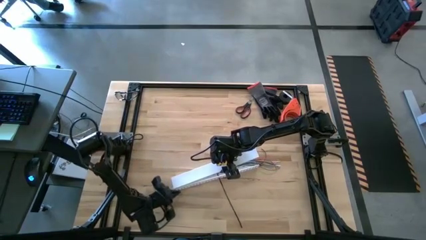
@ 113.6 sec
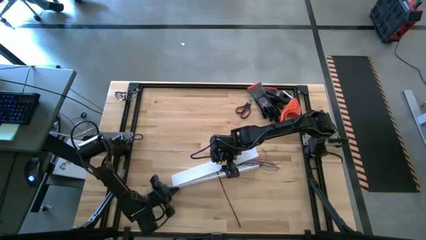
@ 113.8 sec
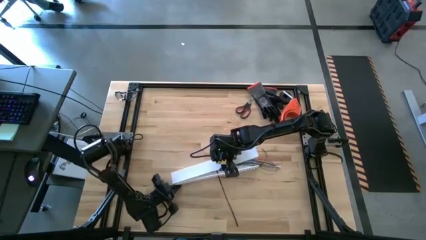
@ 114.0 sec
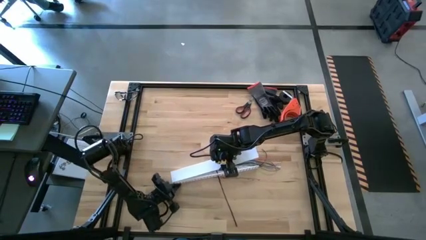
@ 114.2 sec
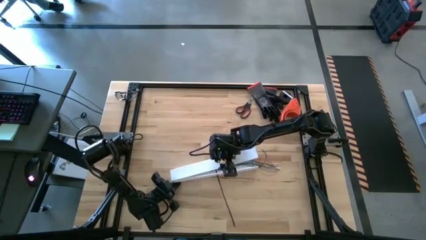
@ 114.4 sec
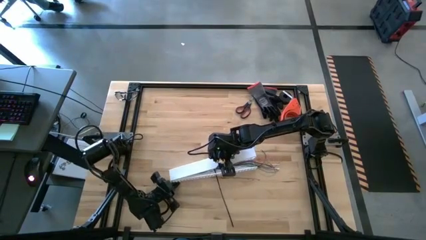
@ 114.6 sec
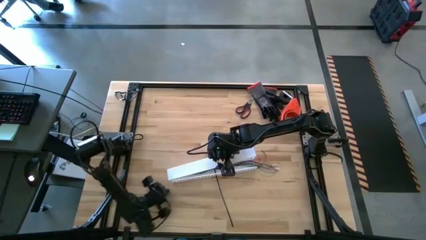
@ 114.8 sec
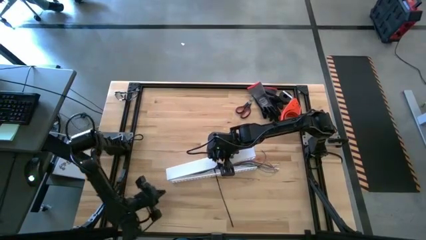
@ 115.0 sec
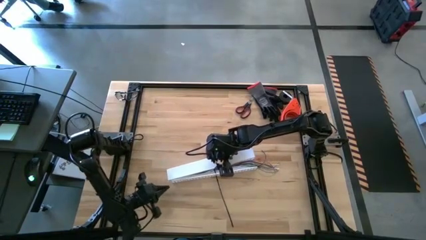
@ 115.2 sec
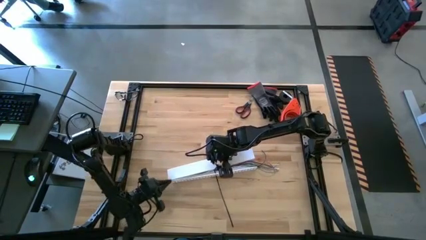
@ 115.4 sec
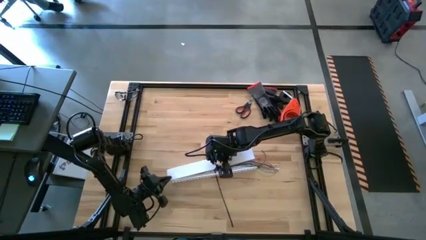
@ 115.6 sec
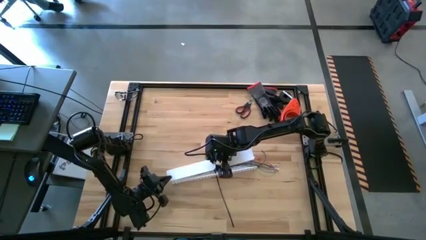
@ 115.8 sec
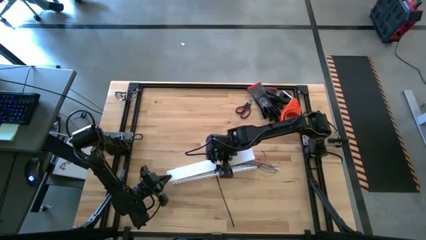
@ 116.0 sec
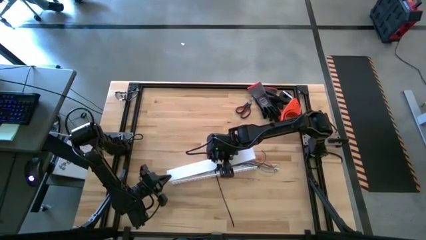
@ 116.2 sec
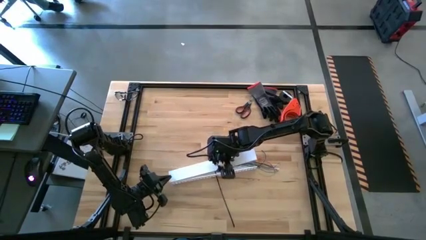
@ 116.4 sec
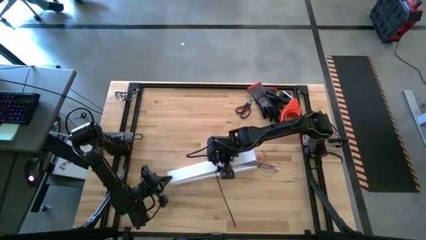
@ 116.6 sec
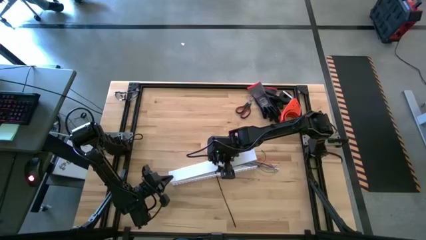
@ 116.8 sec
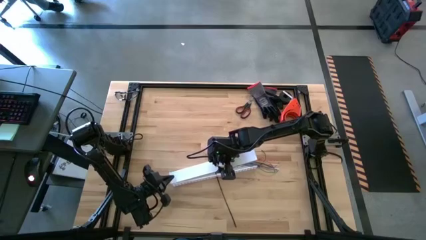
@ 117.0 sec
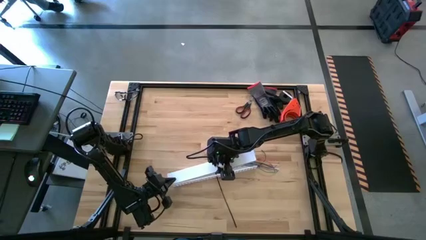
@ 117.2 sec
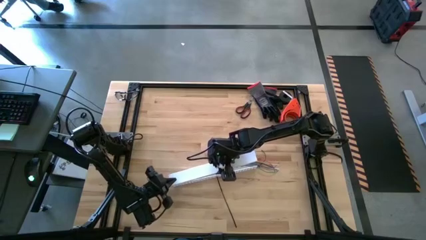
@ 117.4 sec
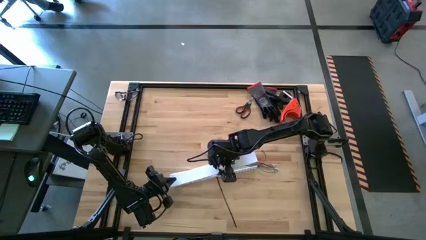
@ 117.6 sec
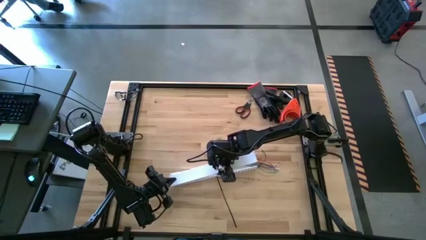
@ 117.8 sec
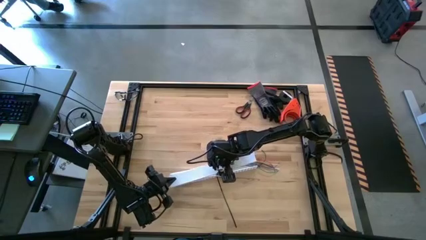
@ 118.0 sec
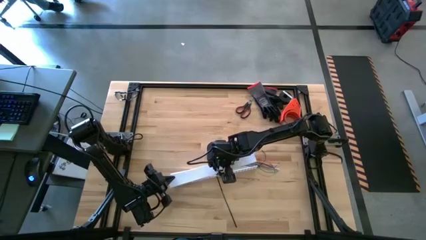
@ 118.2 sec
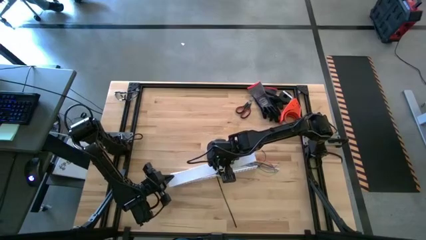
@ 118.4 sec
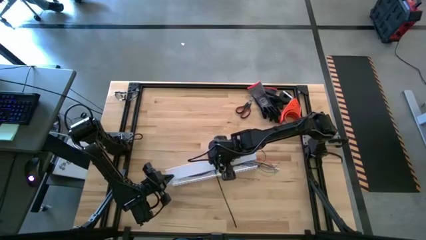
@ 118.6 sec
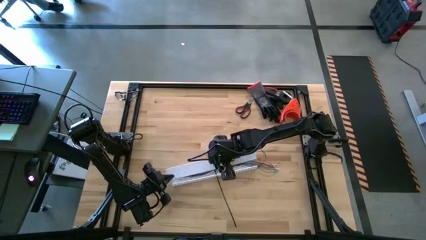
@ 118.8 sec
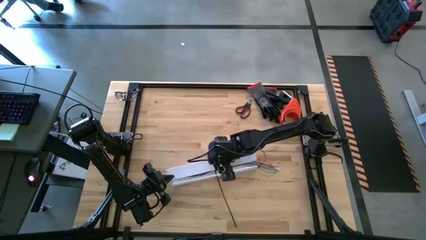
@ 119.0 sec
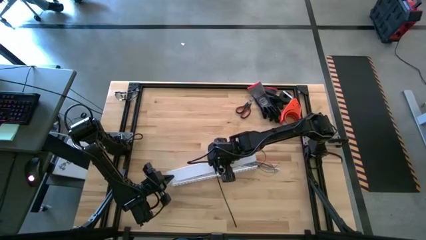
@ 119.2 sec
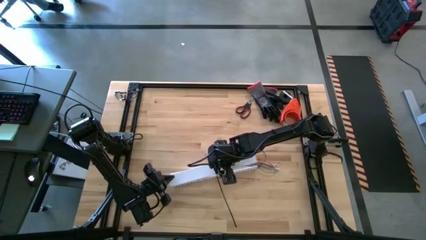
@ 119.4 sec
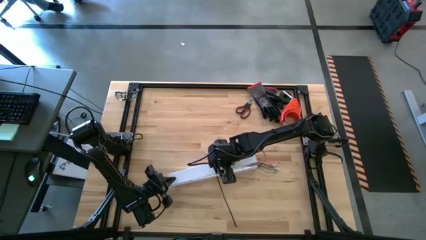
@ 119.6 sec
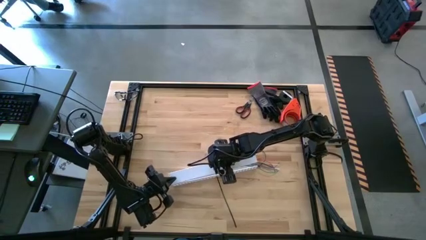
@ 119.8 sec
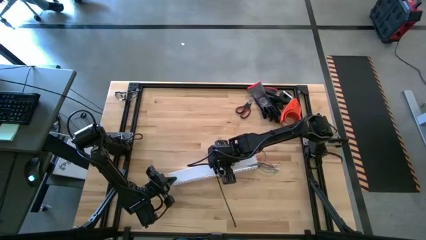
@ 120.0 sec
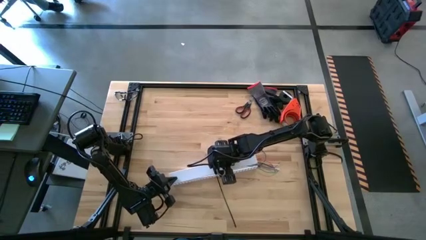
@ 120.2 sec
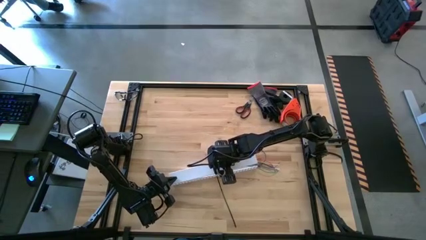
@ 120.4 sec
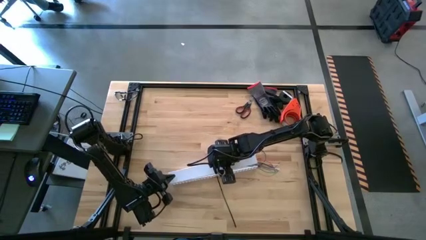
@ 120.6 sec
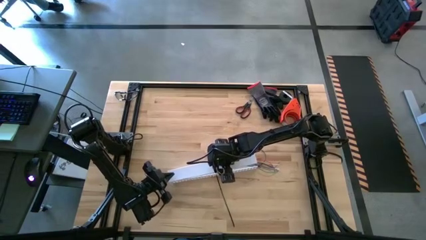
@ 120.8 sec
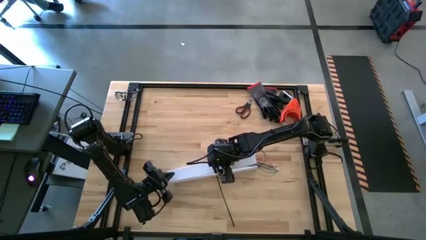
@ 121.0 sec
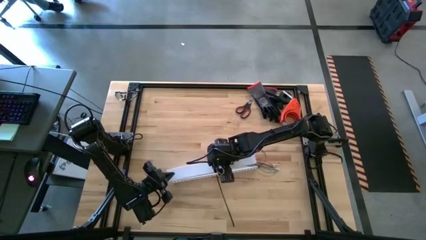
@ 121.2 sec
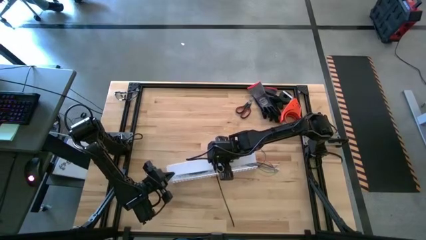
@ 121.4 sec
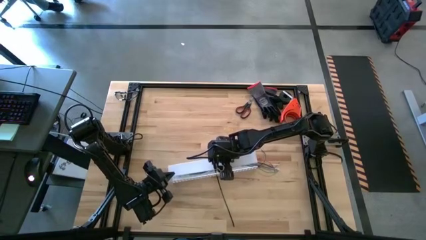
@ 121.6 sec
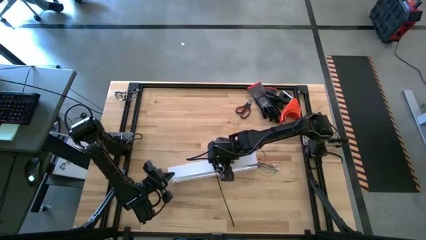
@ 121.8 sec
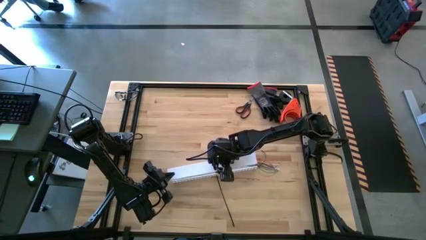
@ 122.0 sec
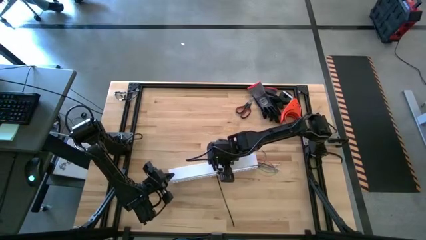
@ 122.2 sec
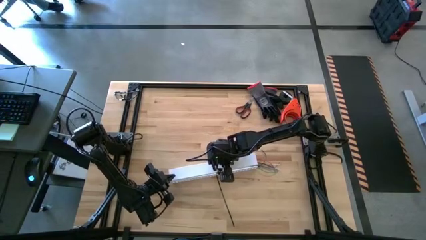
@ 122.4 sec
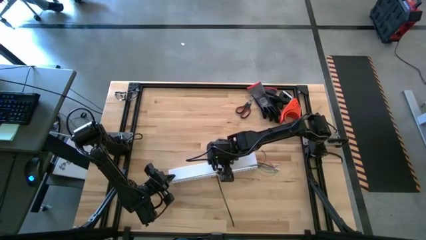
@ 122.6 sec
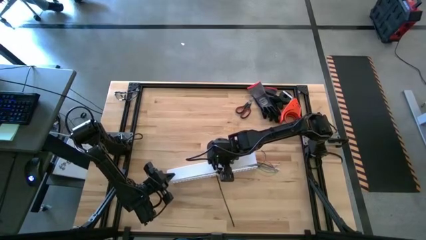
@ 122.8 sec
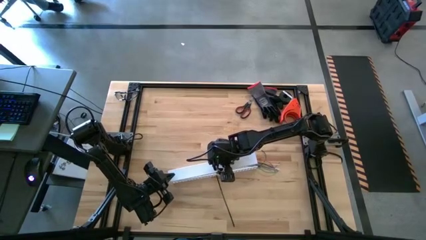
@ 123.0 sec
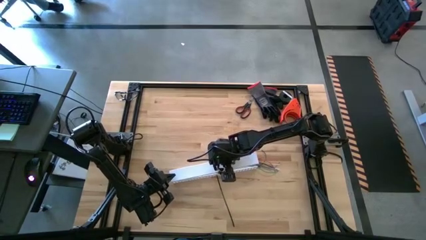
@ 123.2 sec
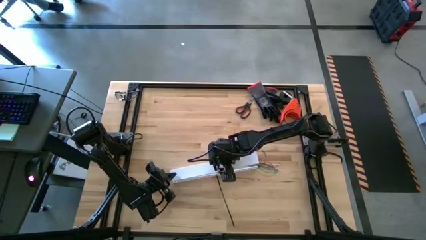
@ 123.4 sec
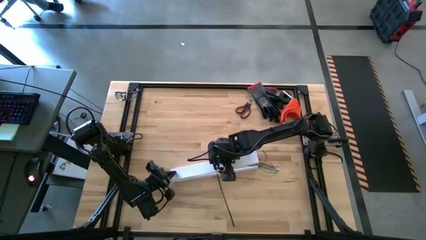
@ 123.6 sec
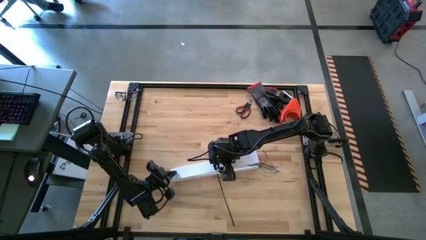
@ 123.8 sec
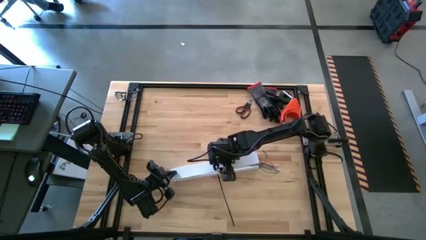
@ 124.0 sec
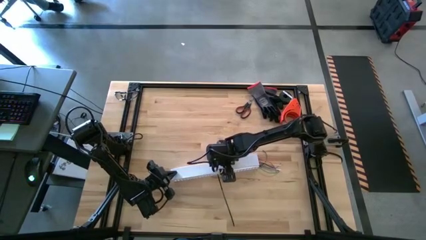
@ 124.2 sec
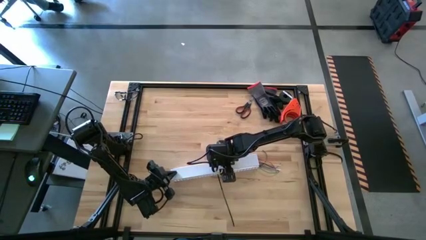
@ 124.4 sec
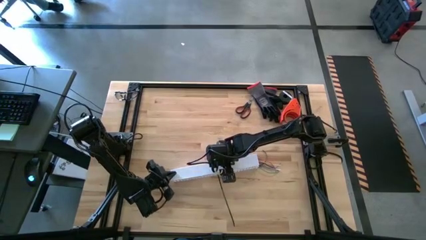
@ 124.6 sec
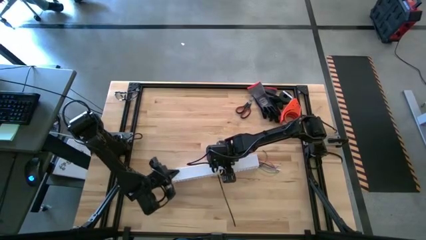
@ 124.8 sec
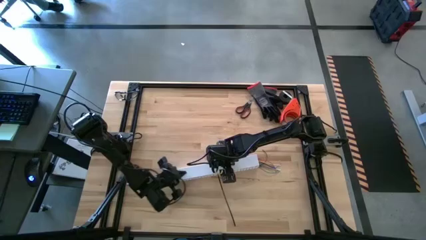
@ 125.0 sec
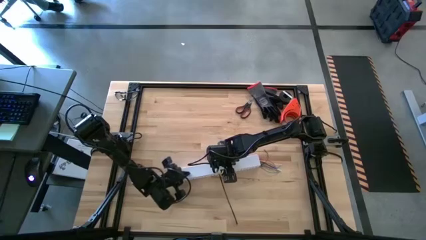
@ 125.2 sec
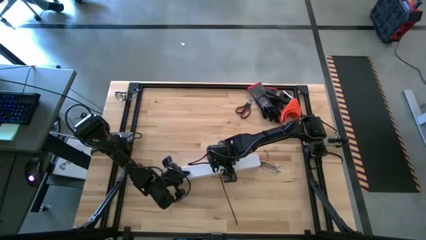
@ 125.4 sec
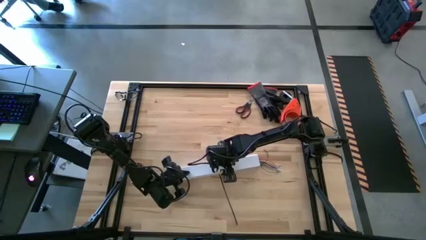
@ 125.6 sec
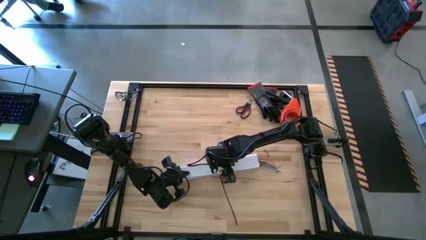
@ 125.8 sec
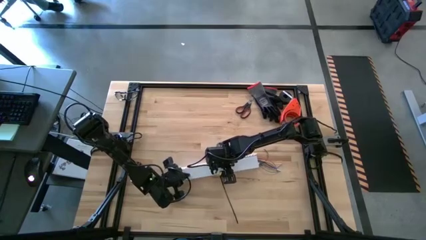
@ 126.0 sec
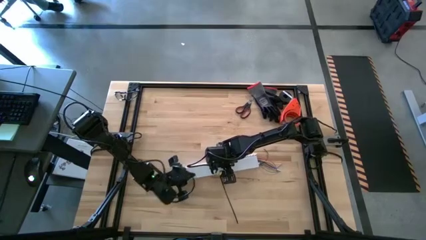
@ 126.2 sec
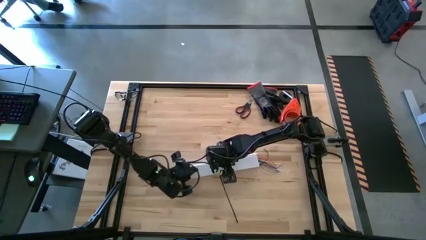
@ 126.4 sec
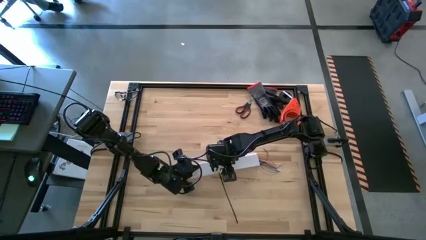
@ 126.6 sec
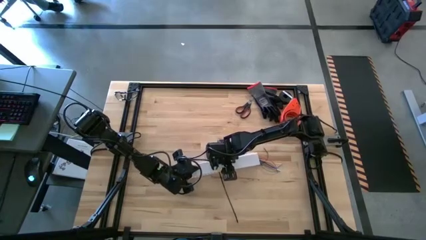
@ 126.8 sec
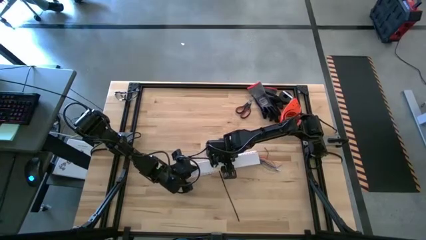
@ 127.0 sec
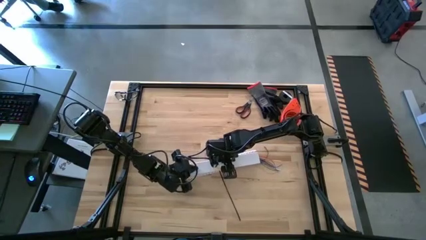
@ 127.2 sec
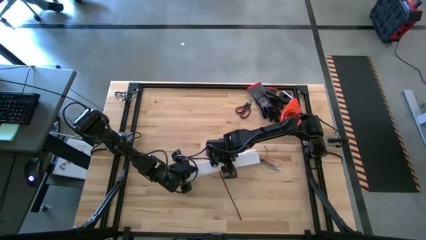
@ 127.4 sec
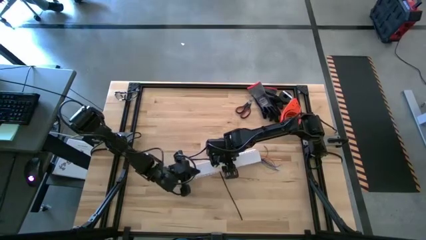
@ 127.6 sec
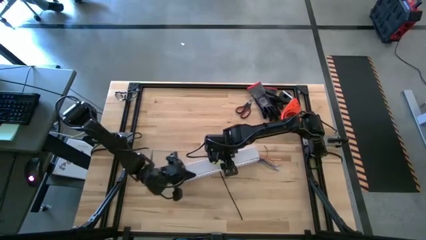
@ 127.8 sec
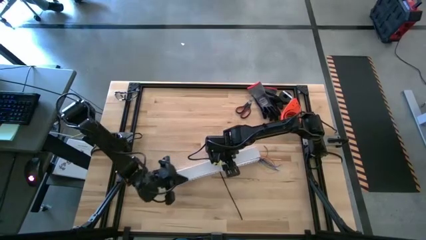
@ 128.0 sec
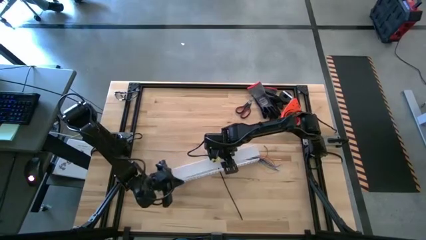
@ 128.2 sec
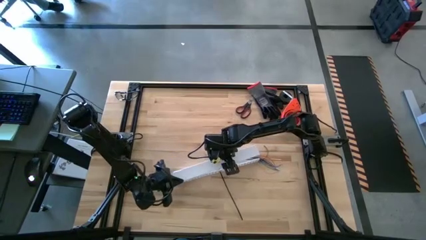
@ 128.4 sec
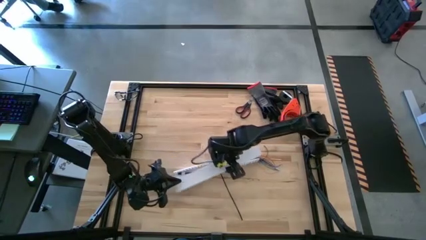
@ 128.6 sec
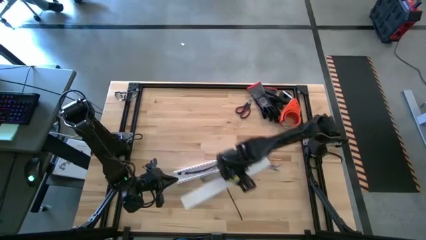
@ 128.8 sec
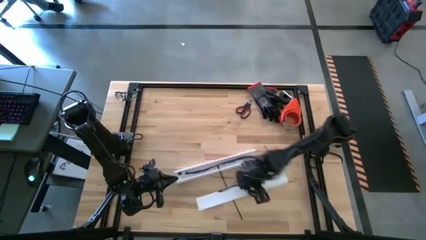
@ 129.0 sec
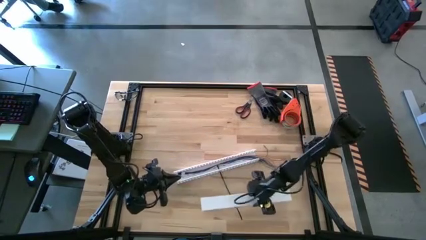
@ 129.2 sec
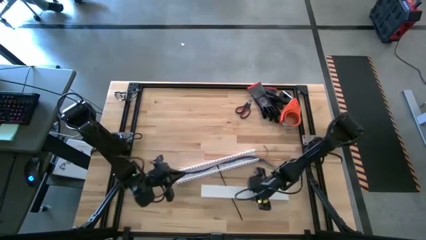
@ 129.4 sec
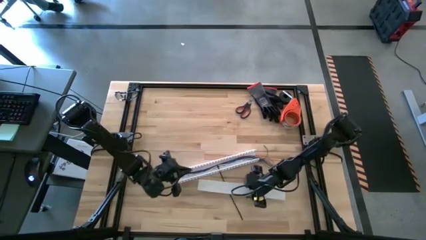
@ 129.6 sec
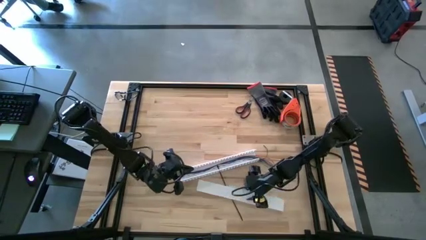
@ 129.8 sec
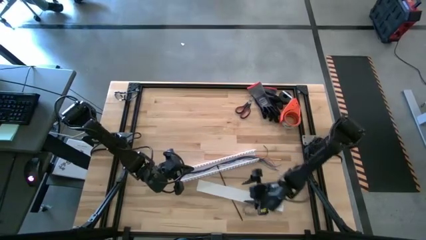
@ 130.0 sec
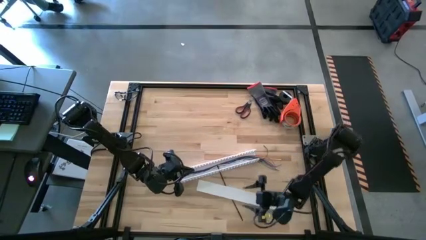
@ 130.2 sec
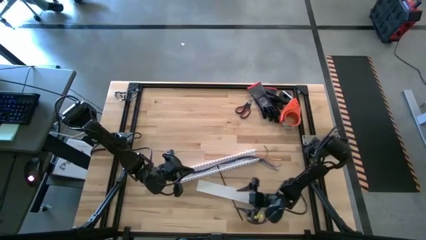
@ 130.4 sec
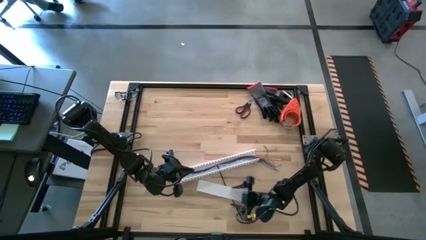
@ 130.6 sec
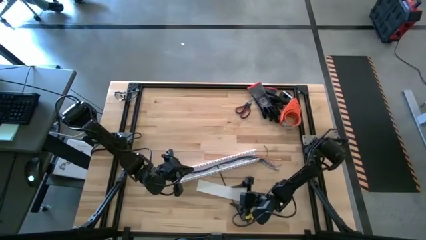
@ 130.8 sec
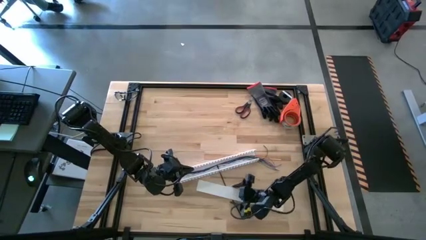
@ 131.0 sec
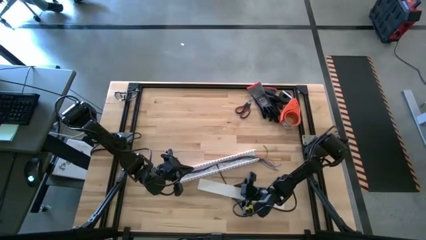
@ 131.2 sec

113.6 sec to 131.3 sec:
Task: Ziptie cables
Close the white cable duct
